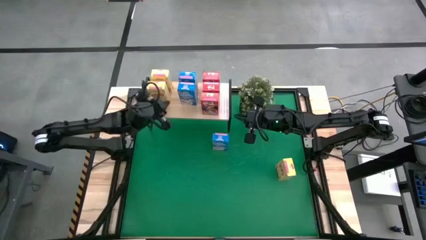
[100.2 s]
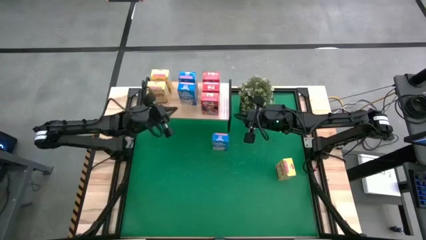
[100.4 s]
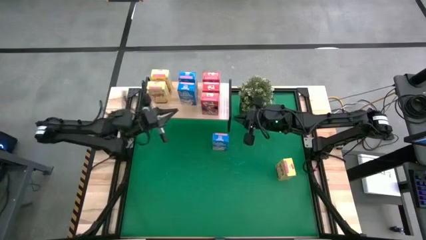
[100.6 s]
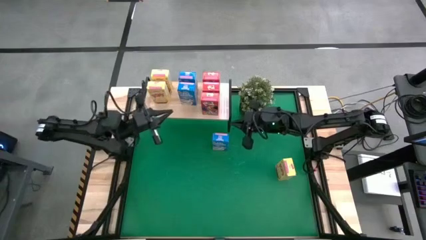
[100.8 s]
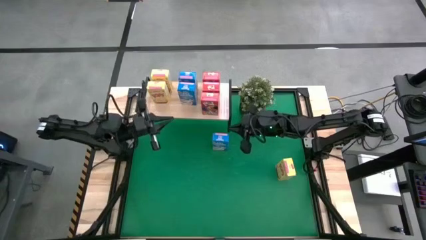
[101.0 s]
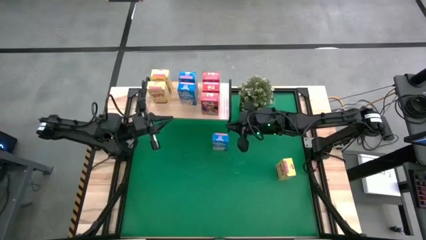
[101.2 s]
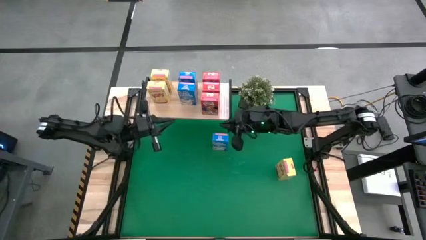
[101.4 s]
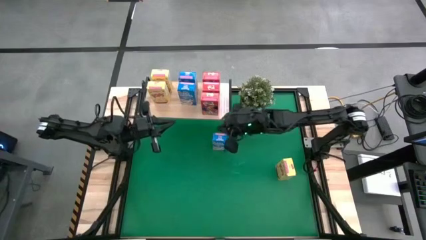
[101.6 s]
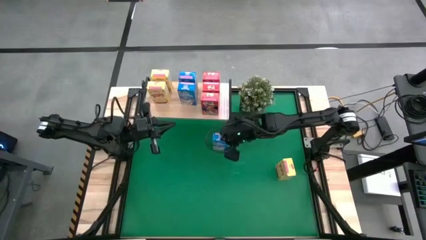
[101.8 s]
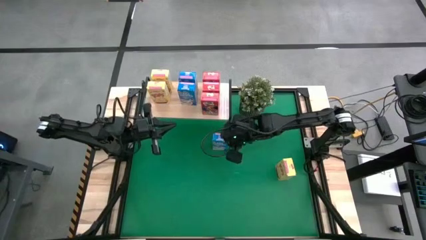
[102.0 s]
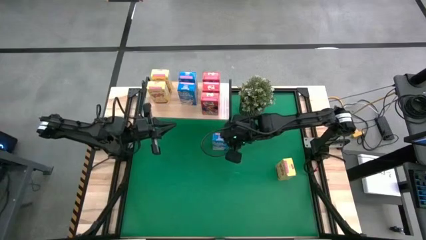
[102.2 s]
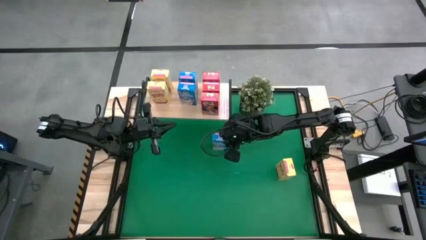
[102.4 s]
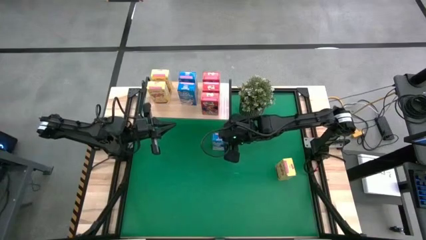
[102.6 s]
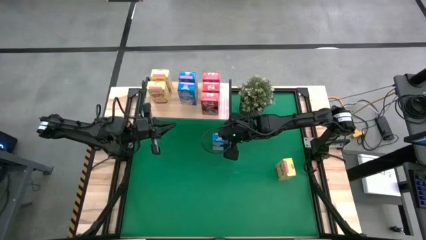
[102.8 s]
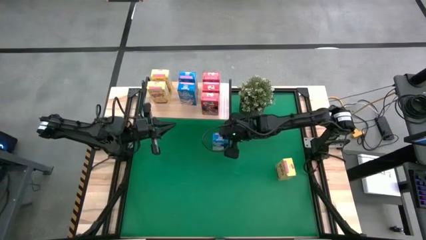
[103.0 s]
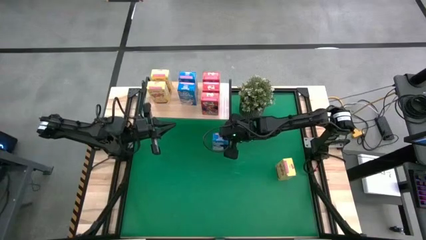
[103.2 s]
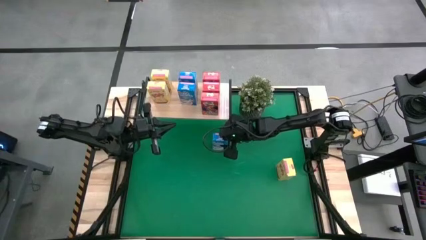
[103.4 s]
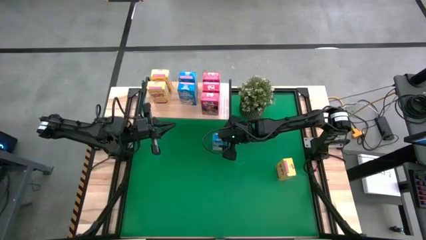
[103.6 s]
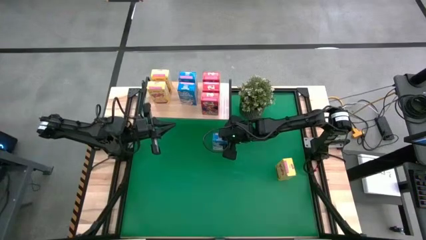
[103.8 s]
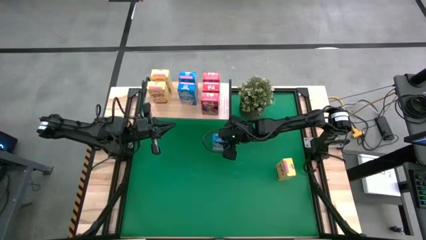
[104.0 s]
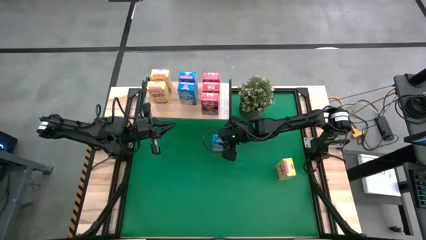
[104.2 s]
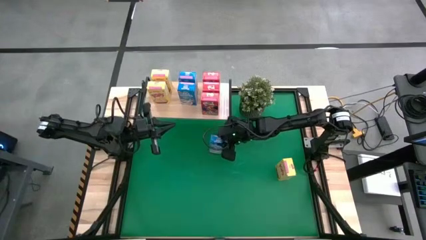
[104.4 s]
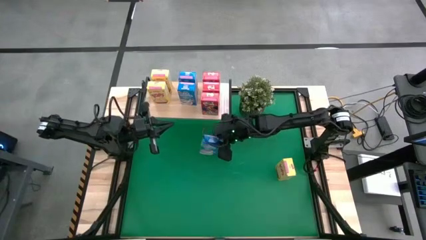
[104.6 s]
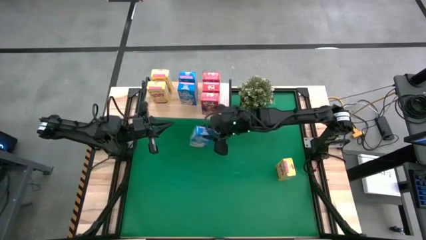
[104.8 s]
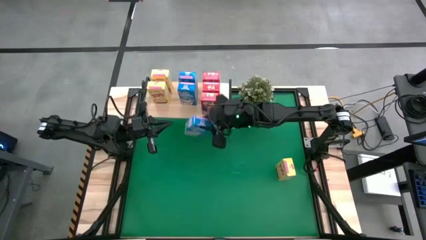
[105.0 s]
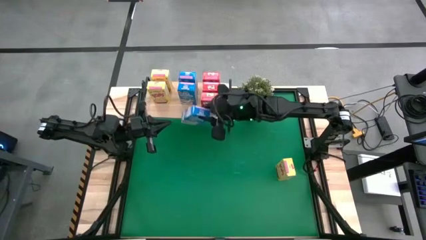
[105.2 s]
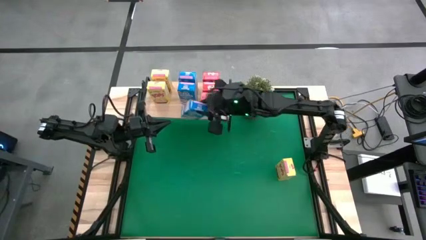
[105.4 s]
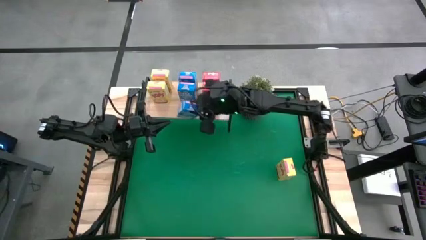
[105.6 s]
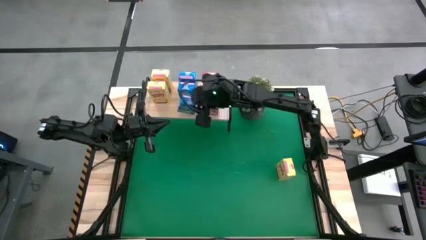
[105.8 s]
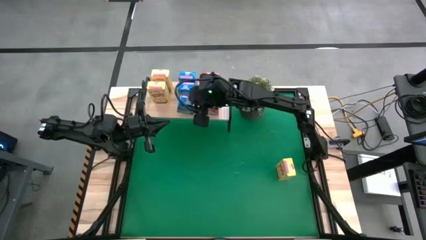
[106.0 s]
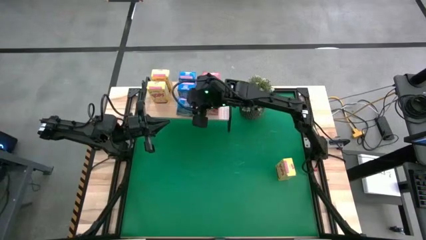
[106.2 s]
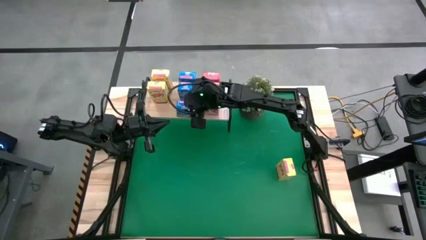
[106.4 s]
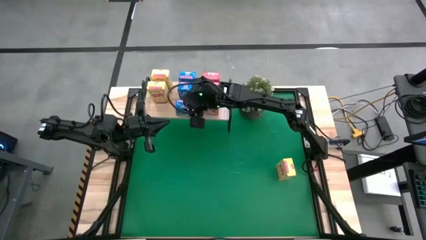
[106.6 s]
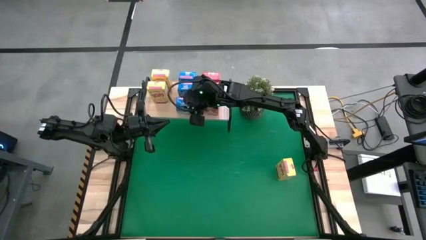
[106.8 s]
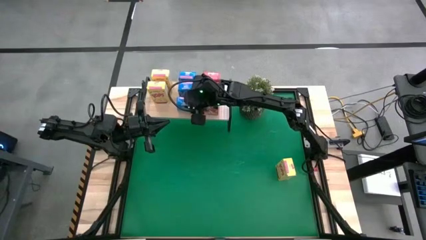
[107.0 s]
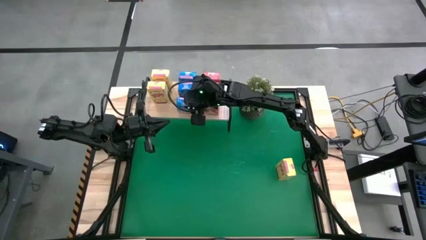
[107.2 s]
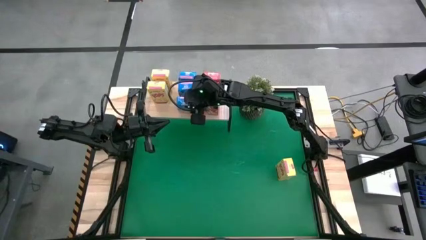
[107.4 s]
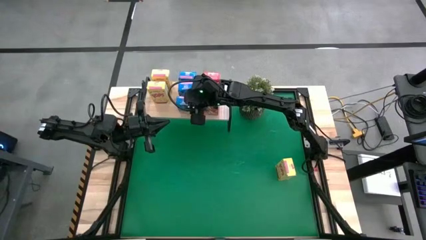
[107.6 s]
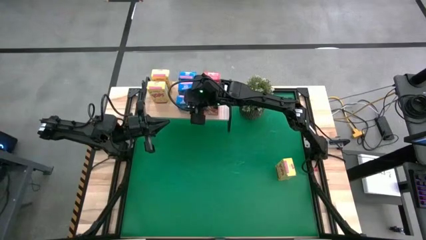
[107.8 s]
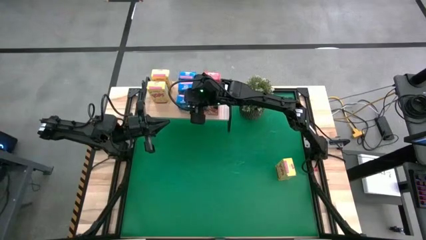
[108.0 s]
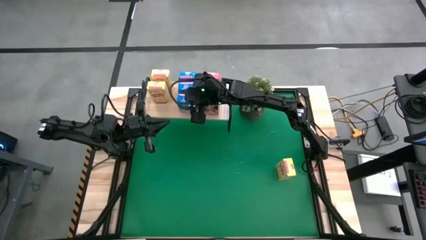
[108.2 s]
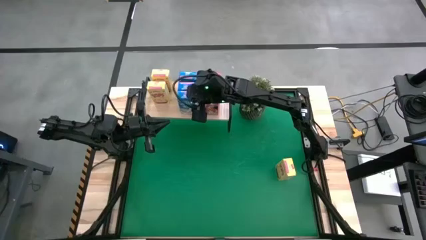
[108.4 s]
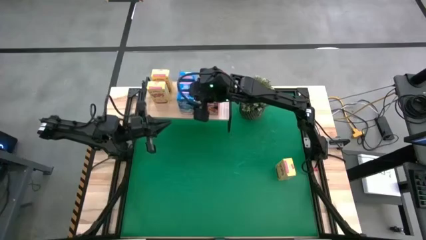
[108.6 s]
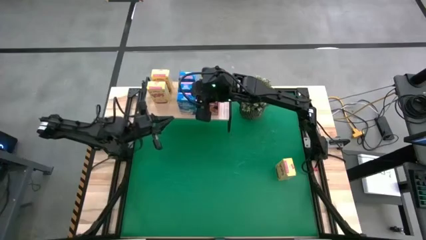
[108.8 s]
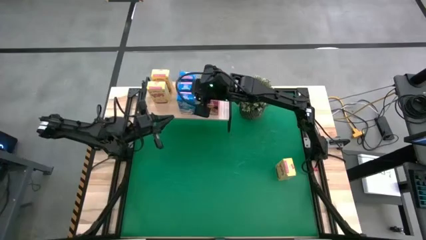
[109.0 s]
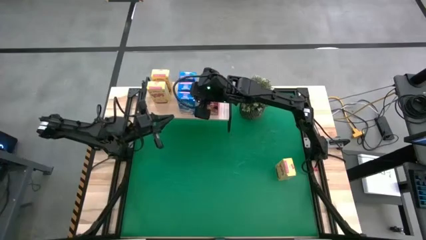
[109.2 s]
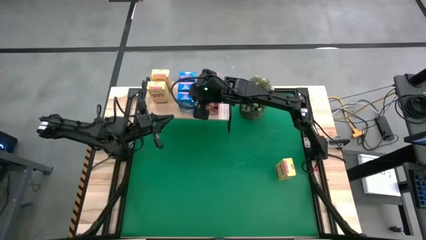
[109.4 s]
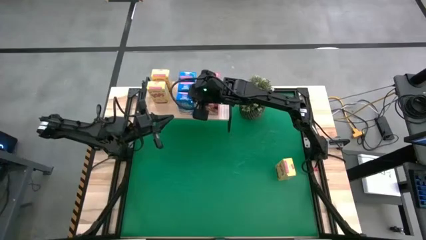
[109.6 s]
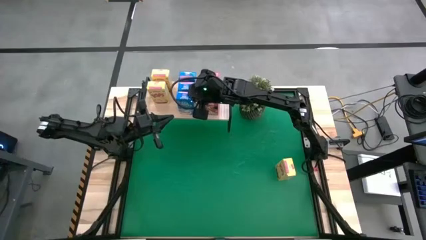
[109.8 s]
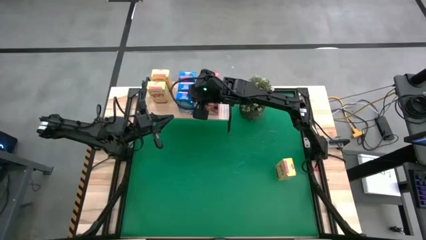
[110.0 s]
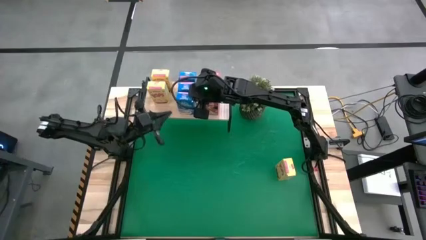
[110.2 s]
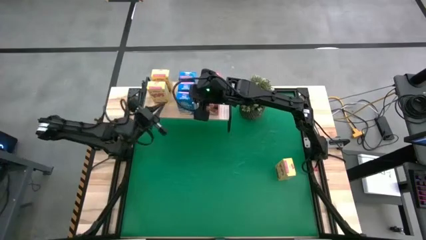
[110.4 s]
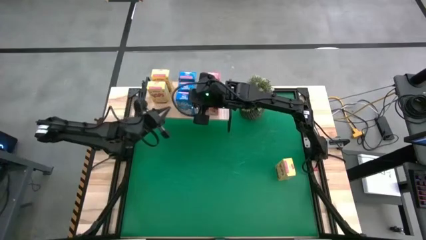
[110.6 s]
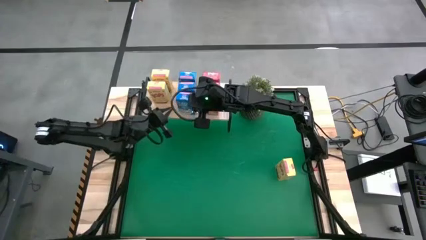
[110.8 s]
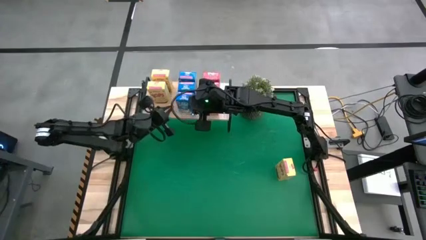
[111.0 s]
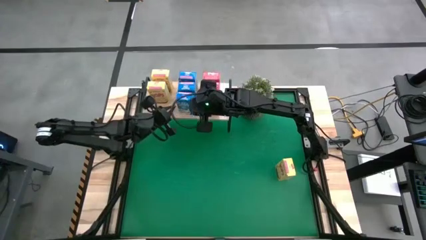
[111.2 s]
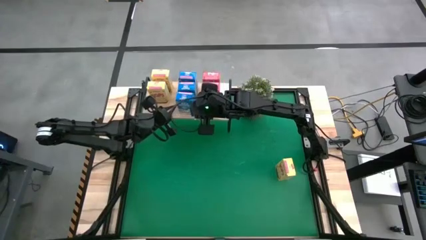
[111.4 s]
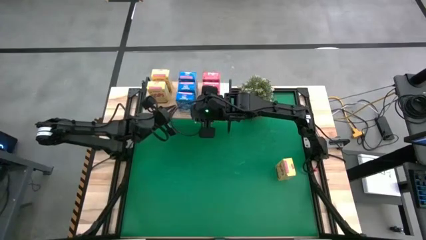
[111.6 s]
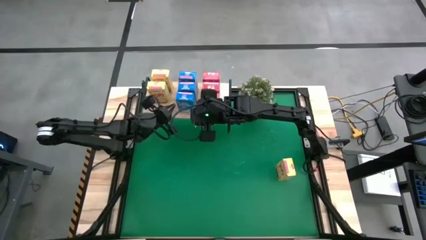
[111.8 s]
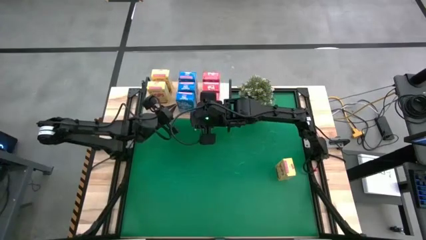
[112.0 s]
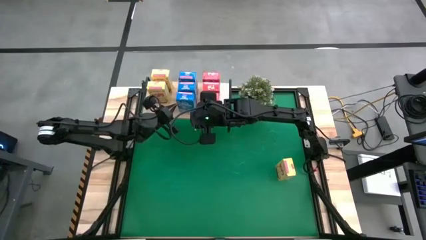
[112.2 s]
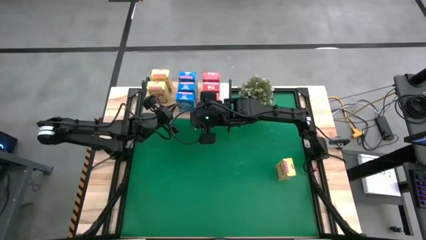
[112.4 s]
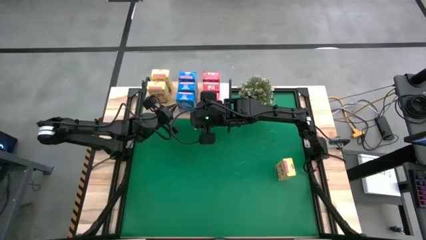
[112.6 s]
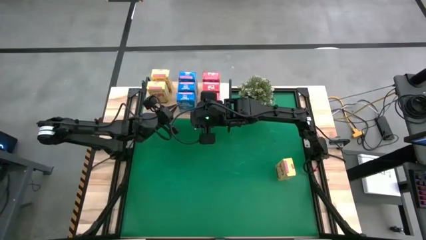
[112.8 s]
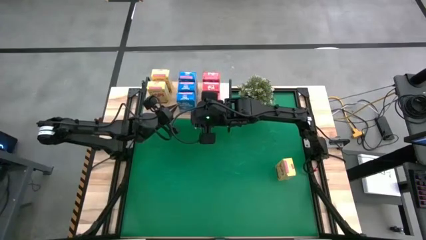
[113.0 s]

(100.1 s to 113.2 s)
Task: Stack cereal on shelf
Put the blue cereal box on the shelf aligned with the other blue cereal boxes

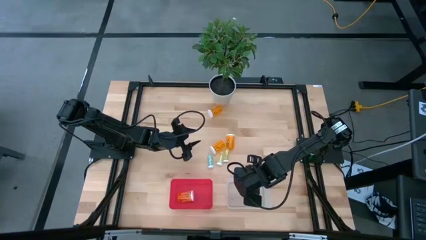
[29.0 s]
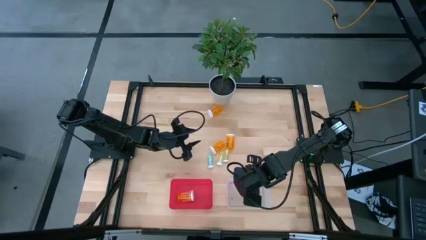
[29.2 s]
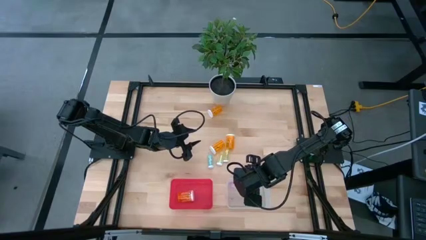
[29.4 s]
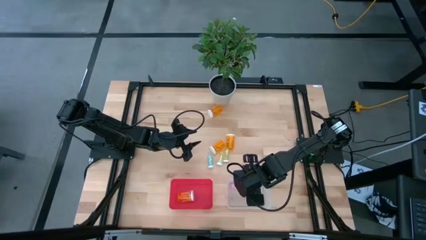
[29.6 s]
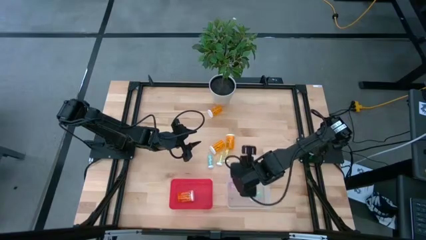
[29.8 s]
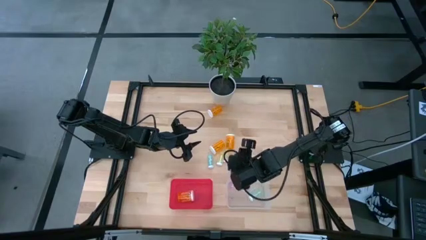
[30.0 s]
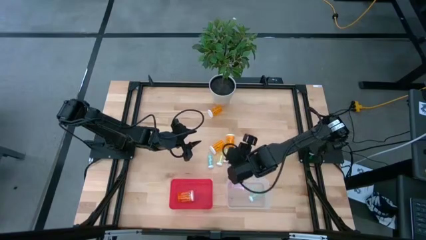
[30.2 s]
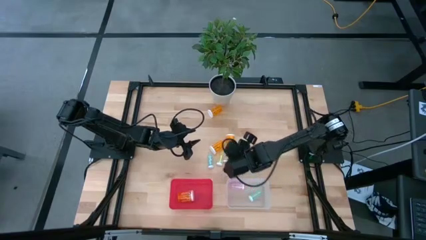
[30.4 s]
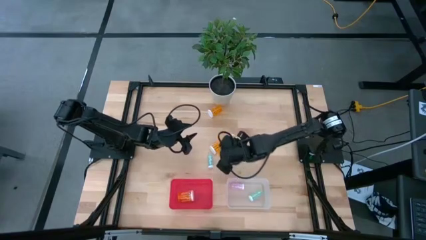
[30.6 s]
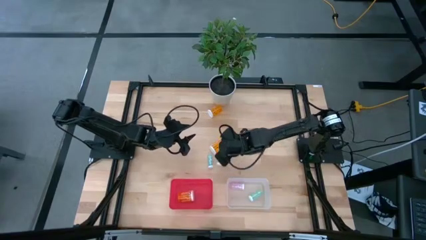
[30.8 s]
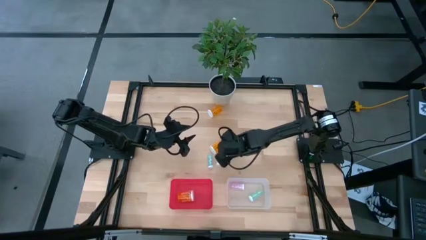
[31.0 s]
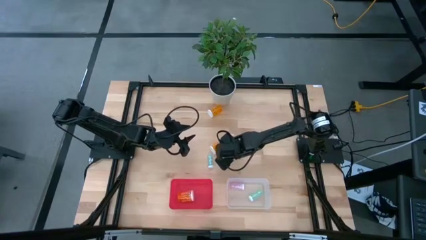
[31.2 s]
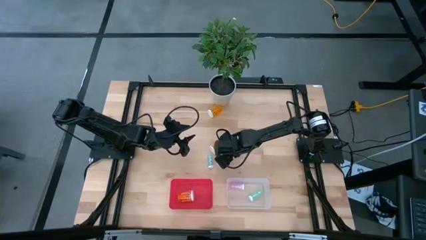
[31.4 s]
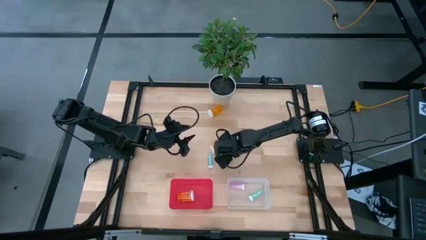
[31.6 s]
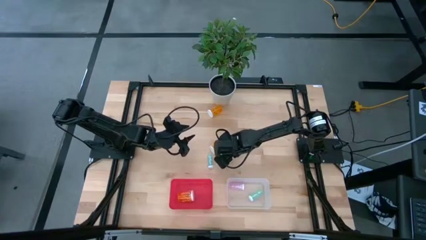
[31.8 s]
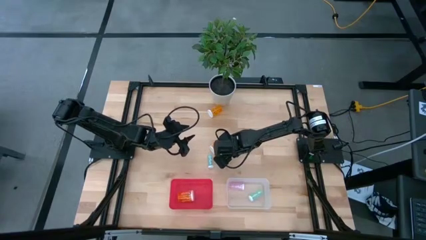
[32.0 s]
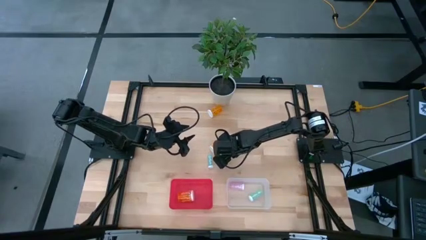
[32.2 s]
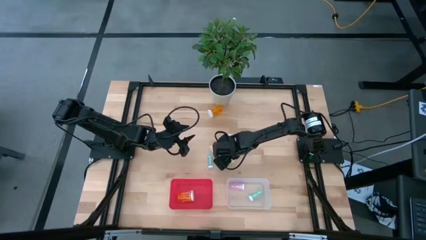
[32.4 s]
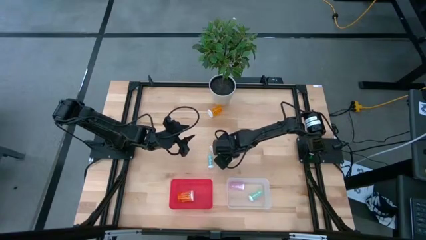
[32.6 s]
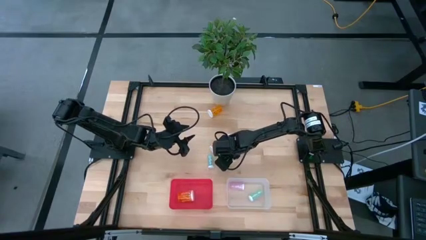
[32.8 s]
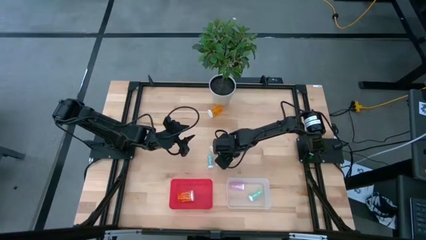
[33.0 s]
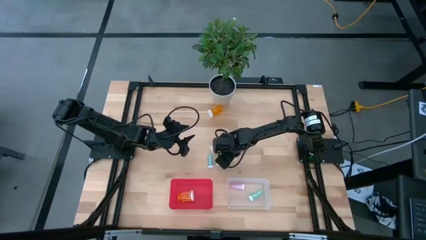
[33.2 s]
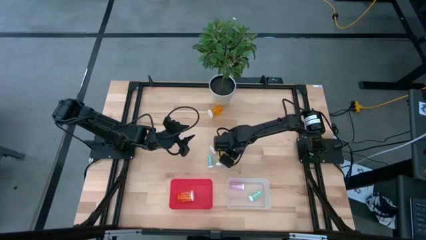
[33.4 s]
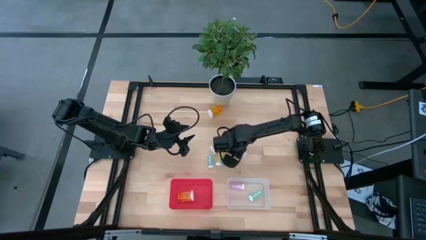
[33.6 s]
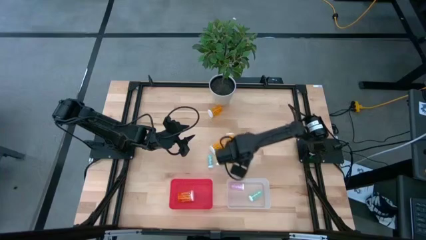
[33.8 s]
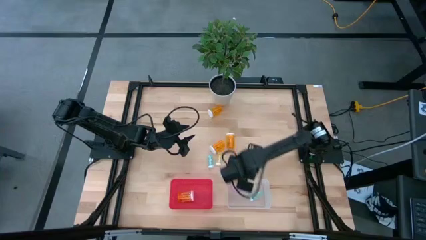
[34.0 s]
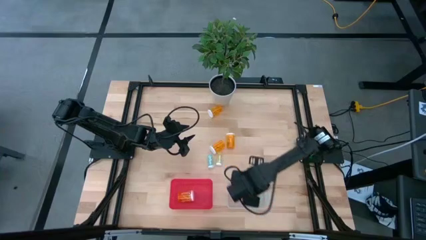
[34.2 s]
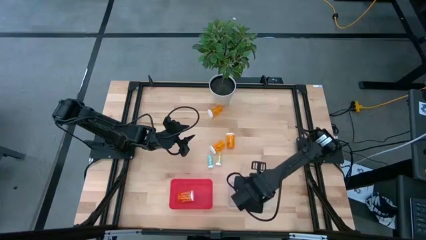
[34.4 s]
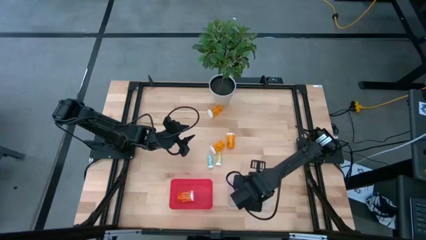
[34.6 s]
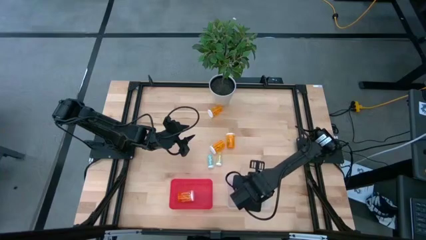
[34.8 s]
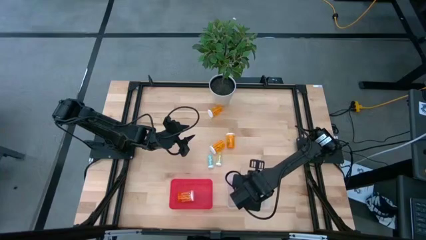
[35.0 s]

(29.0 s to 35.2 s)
Task: Pick and place medicine bottles into bin by pill shape (circle, oval)
Put the right small yellow pill bottle into the transparent bin
